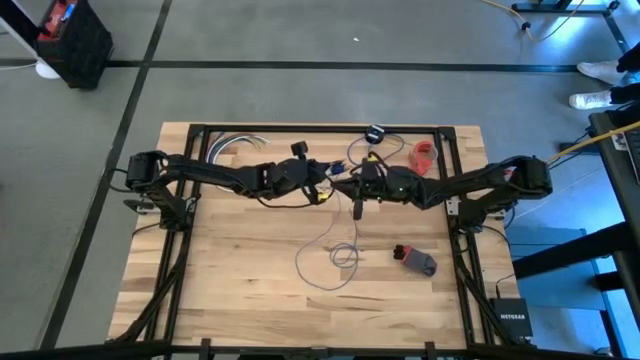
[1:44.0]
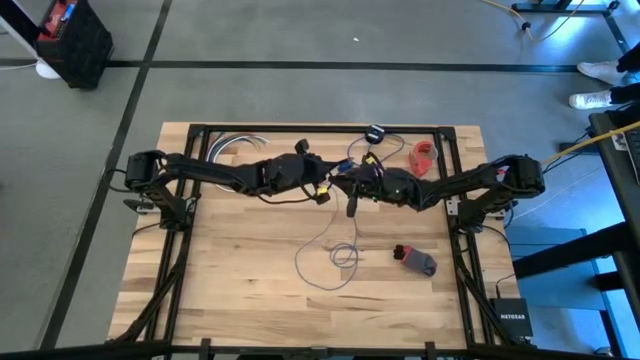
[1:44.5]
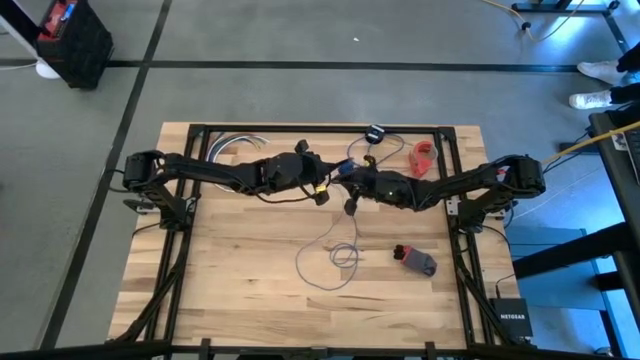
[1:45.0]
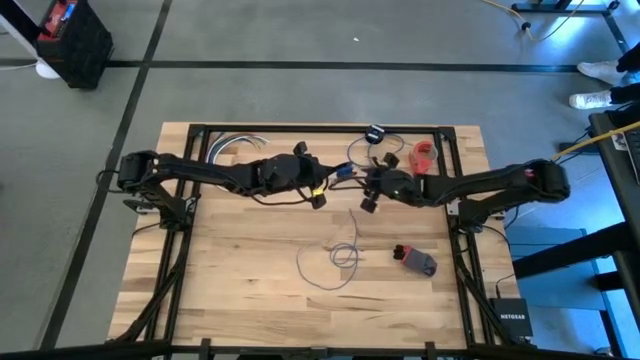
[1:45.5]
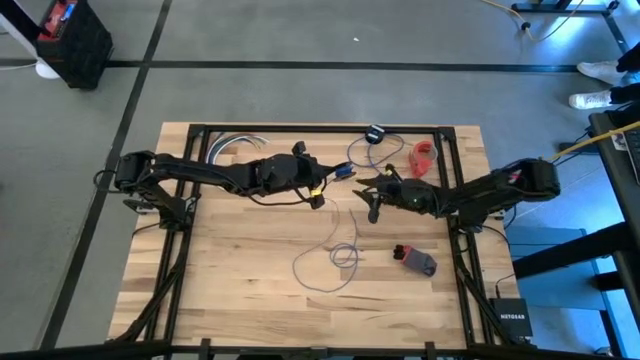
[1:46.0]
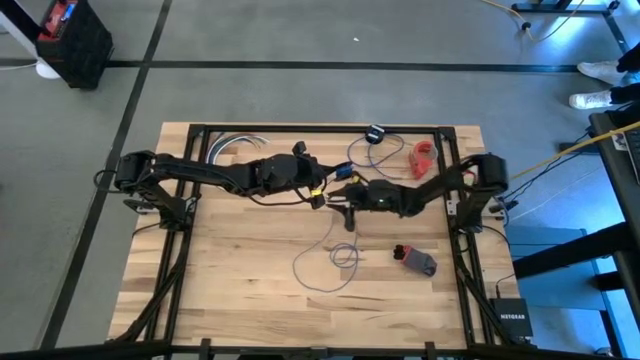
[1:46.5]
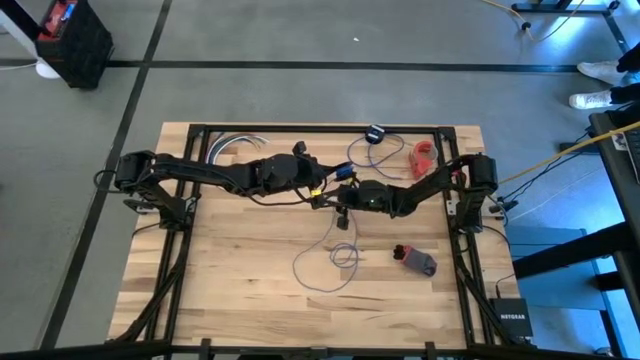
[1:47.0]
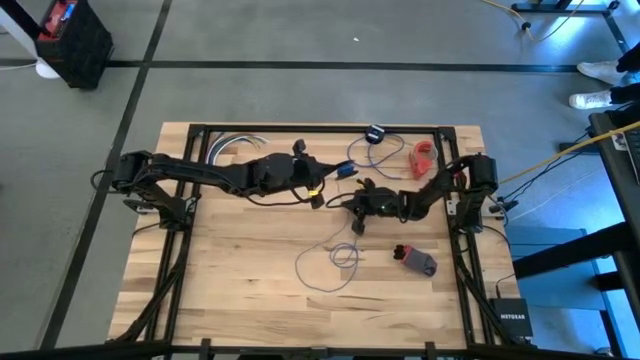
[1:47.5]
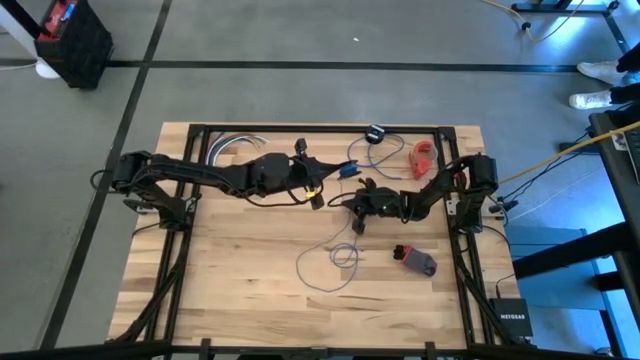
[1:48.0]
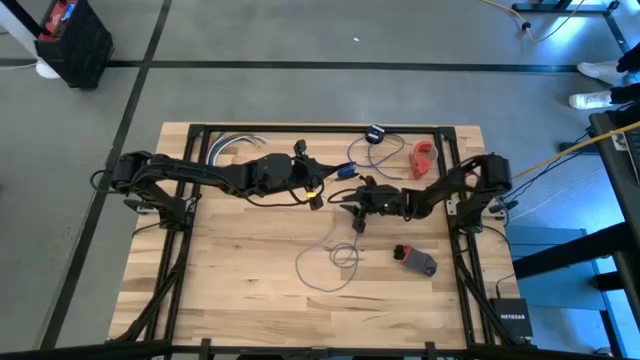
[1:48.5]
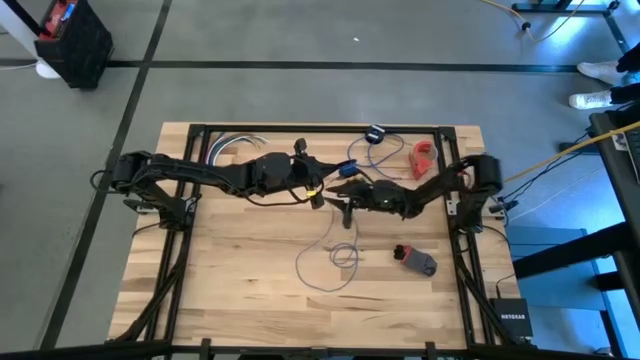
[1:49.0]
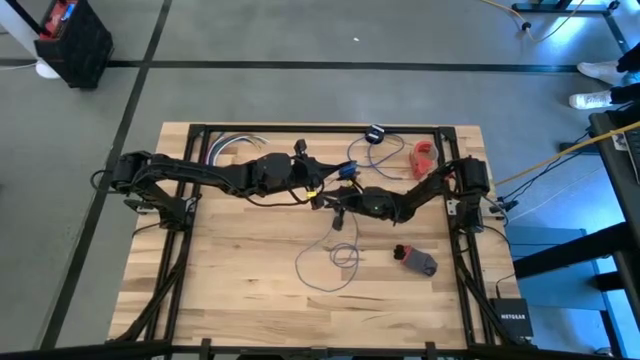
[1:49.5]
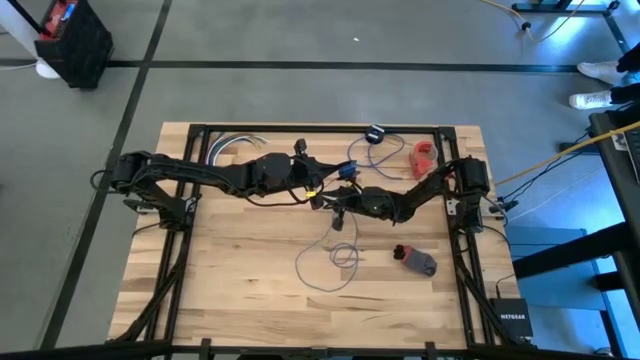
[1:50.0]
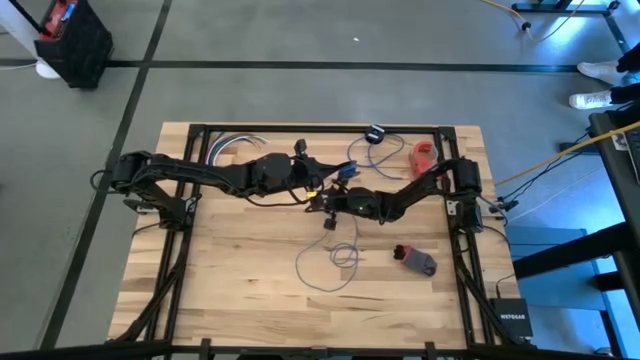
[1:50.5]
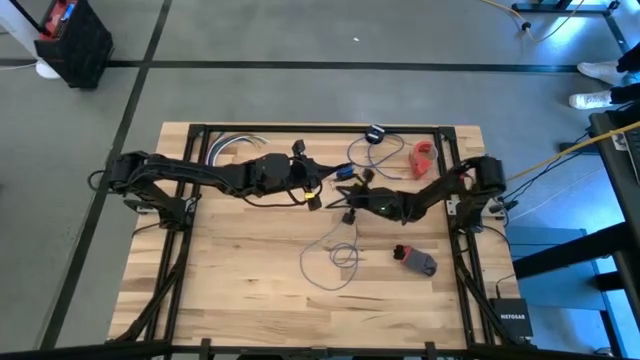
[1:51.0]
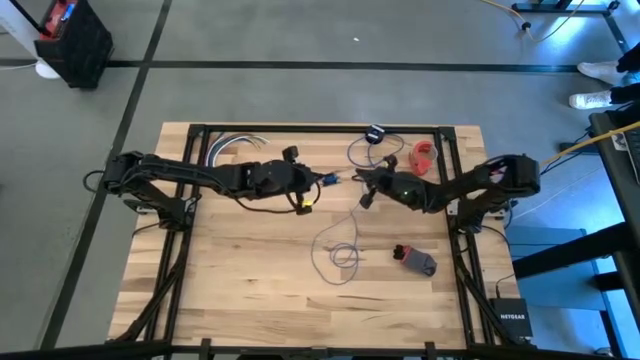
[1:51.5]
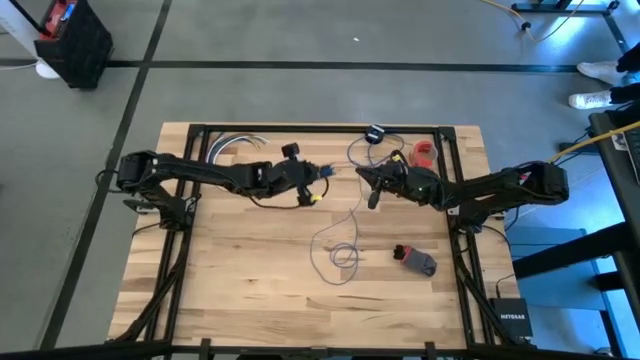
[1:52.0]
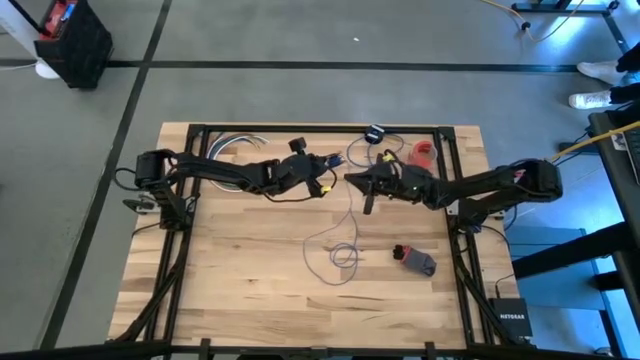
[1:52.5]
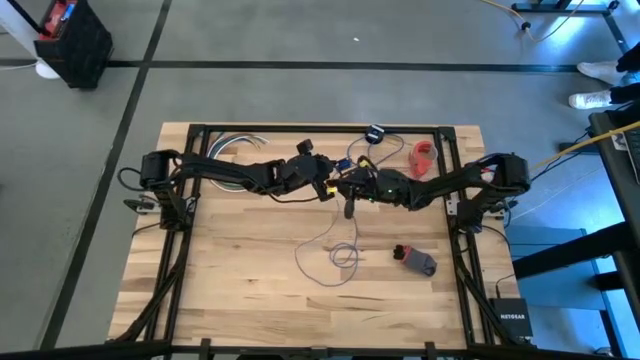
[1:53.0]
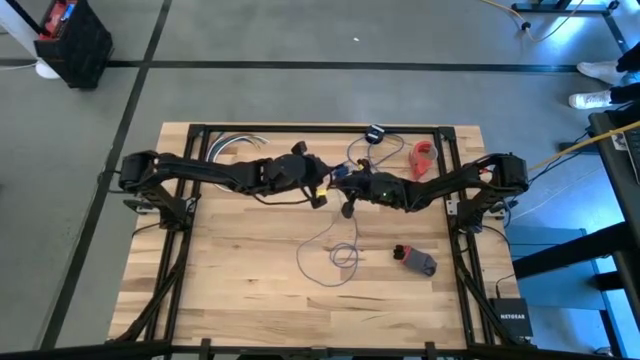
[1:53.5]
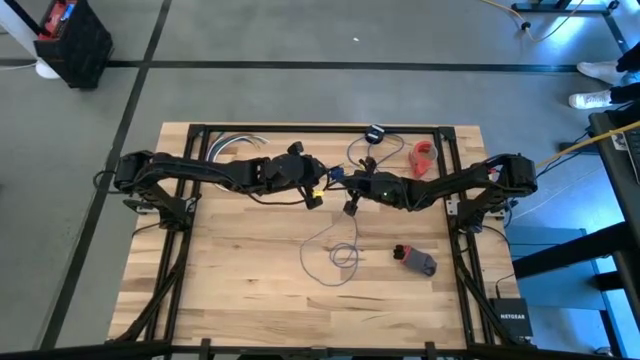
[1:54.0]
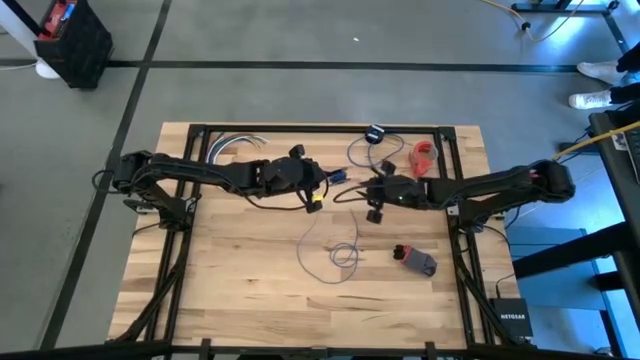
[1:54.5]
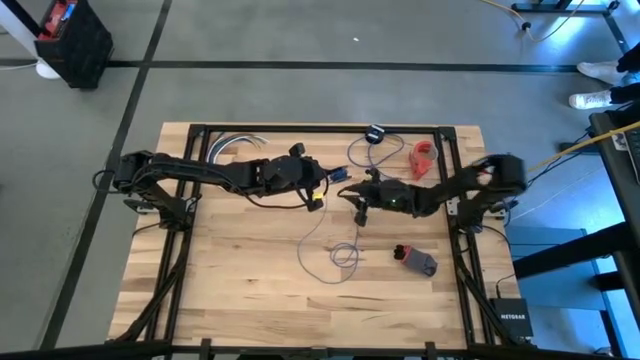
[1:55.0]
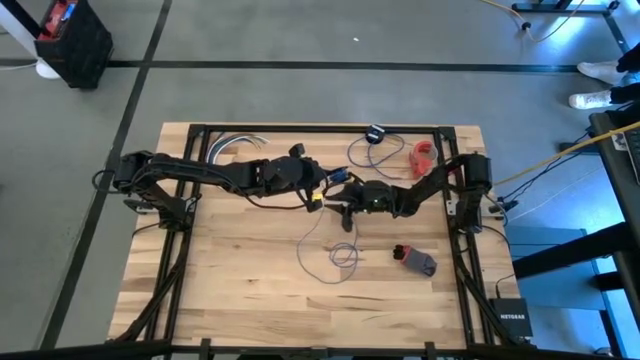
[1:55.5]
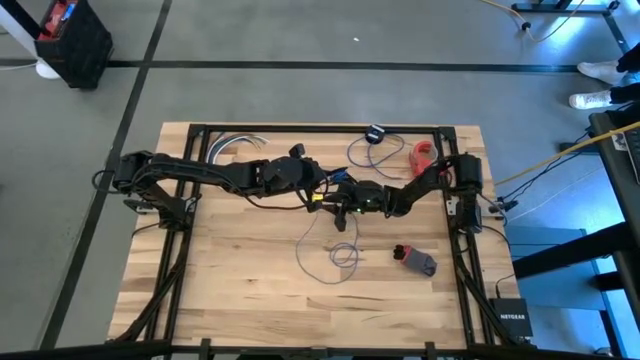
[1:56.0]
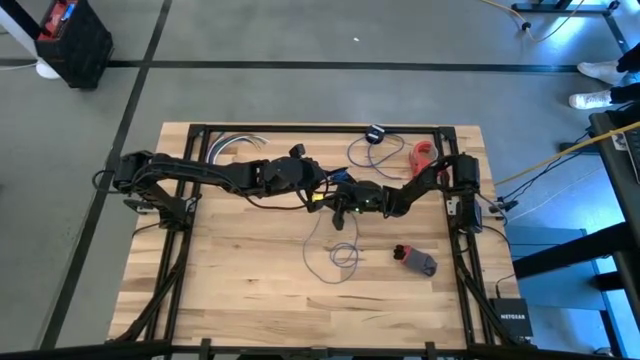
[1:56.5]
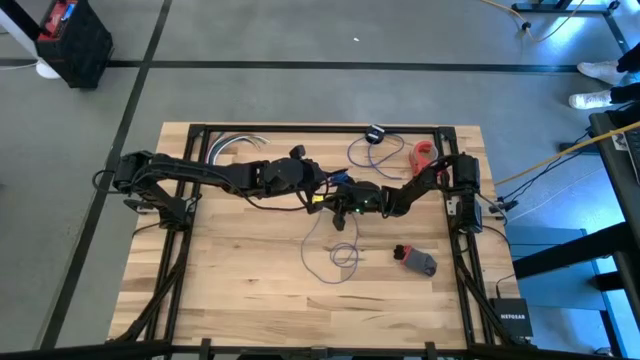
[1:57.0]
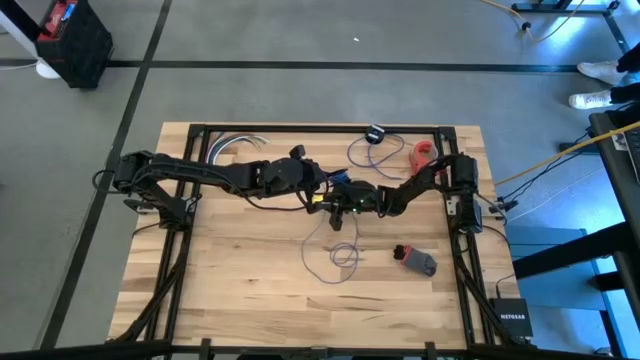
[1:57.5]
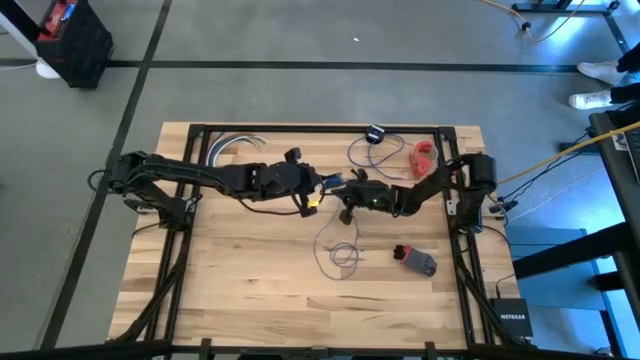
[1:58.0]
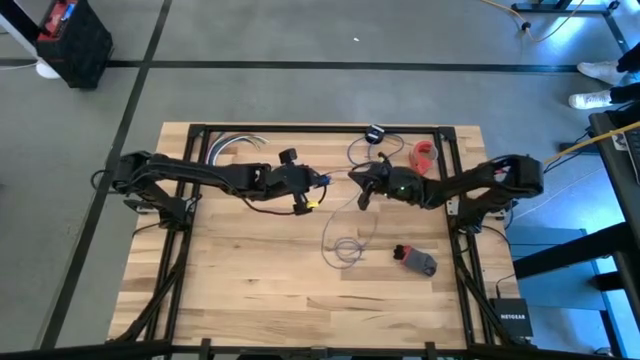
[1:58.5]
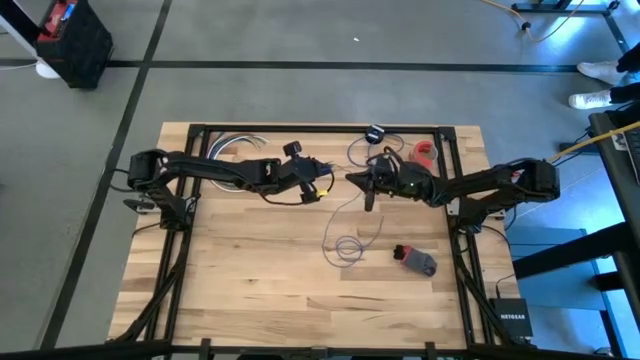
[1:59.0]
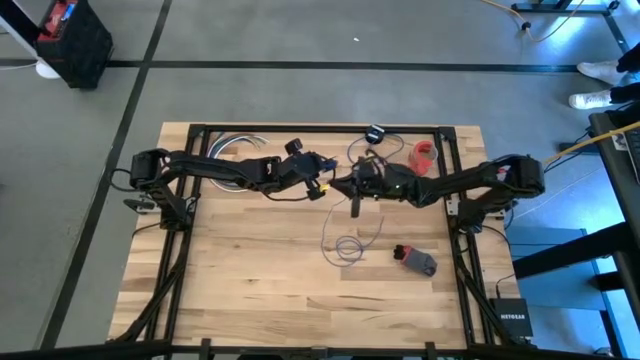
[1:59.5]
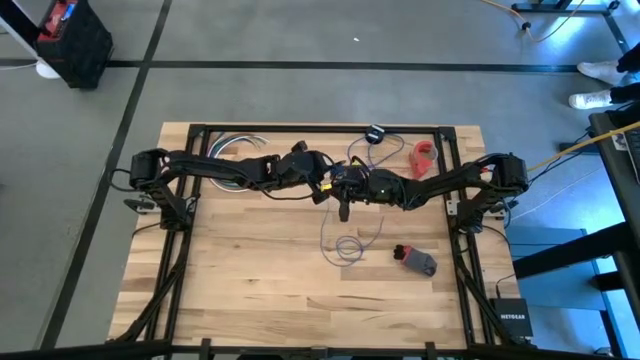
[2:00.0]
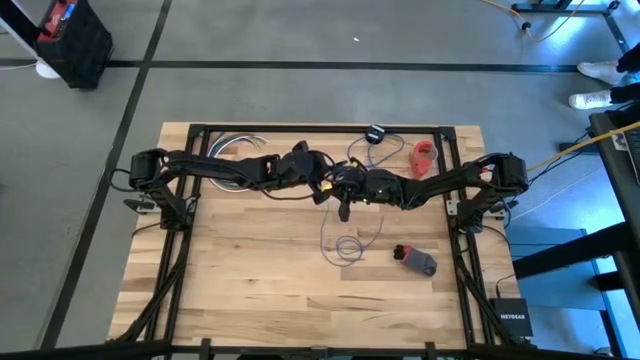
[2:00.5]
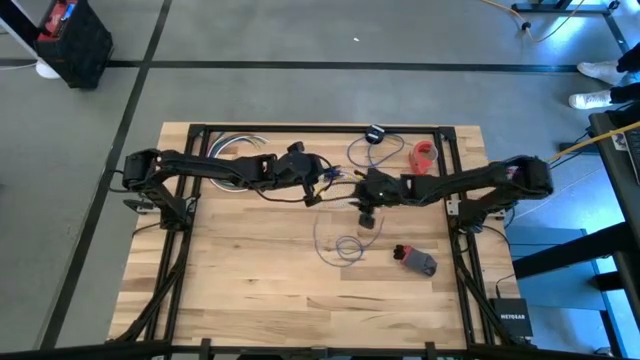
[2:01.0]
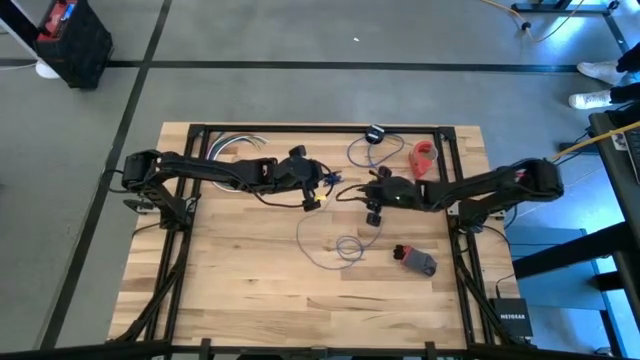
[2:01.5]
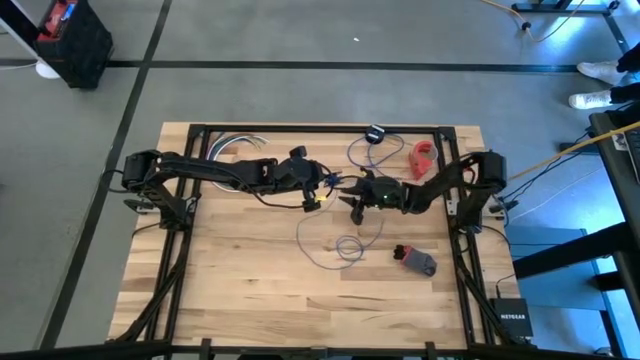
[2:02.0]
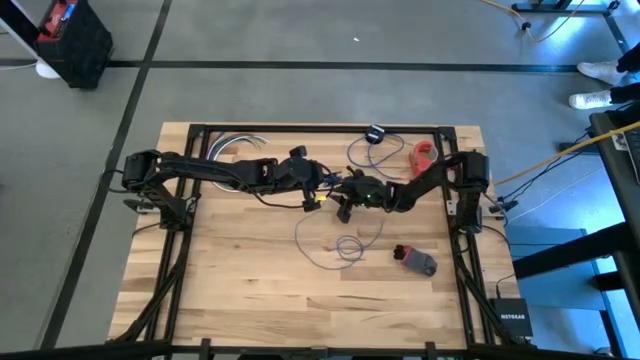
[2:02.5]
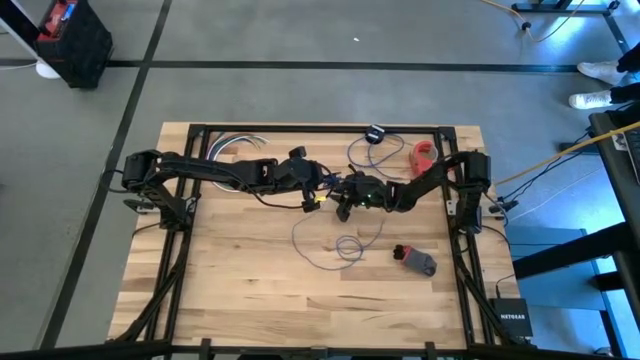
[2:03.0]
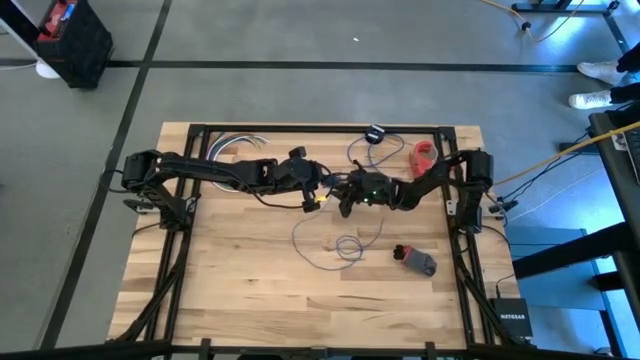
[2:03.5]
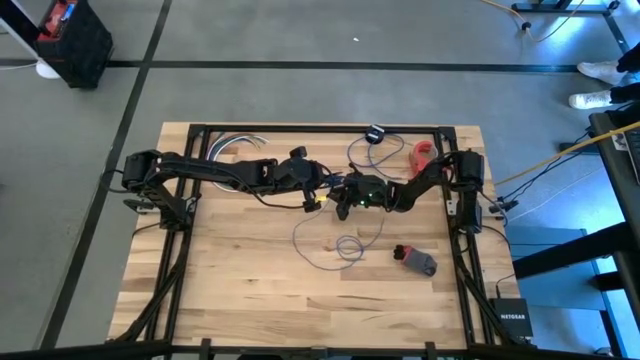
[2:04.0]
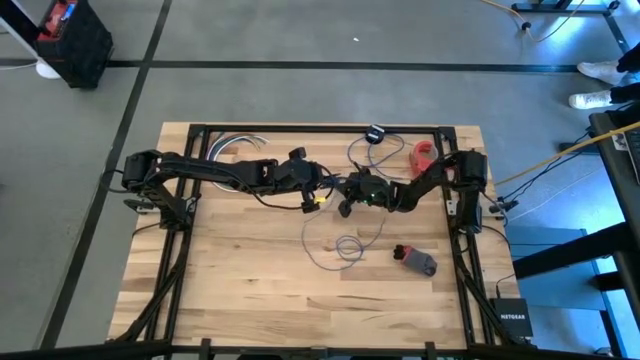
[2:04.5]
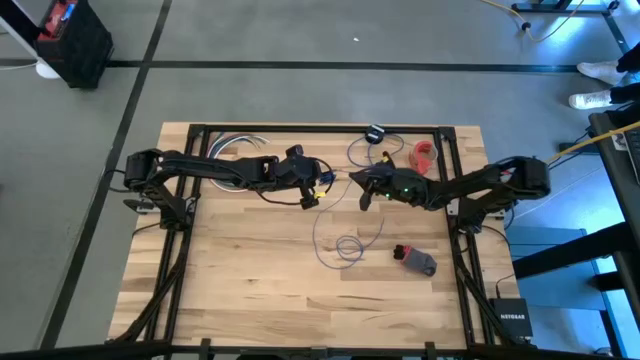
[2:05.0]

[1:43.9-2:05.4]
Task: Coil cords
Coil the blue wire onto the spool
